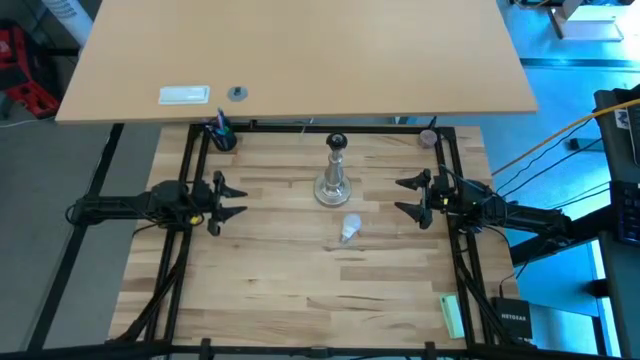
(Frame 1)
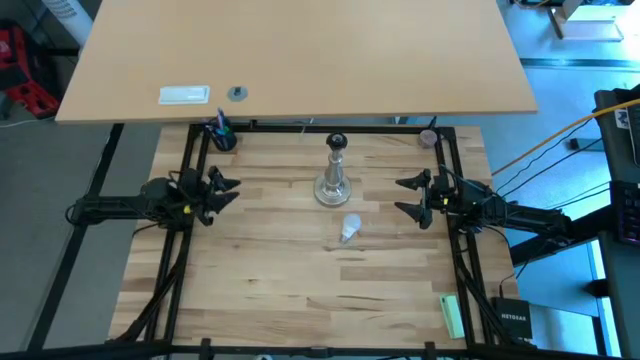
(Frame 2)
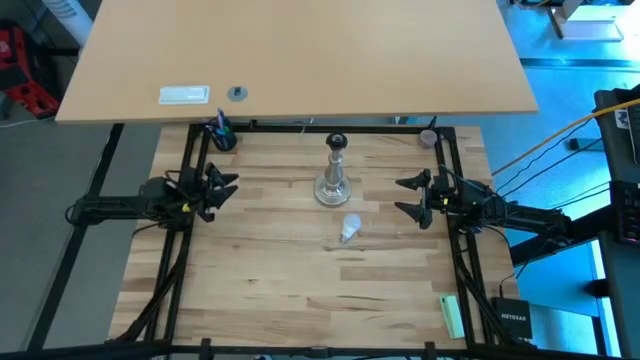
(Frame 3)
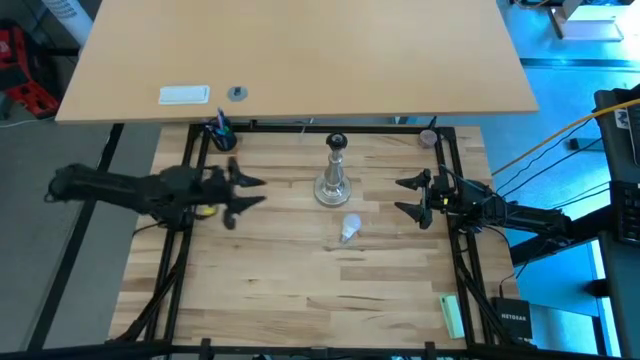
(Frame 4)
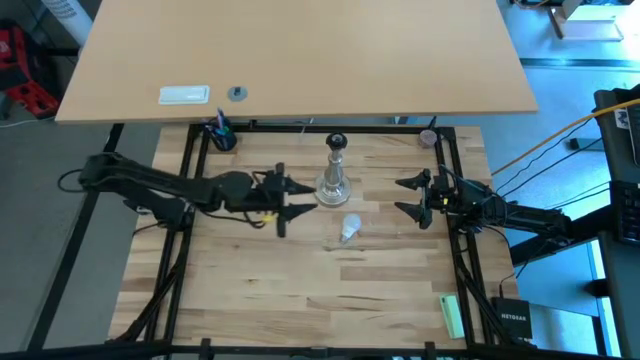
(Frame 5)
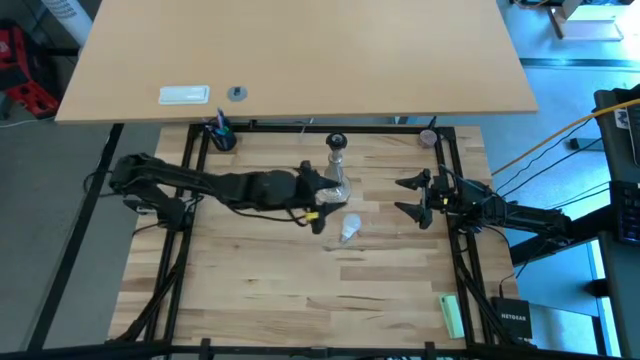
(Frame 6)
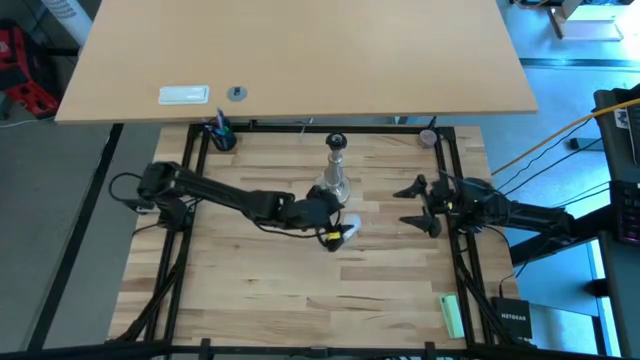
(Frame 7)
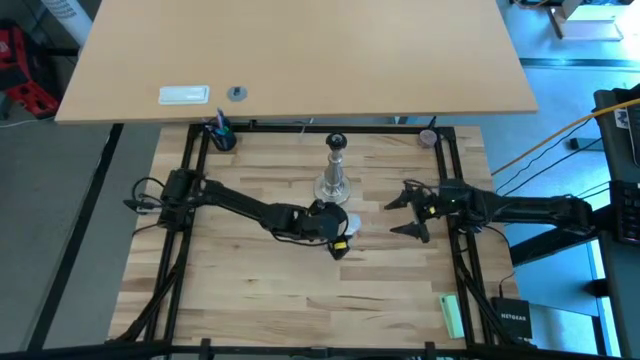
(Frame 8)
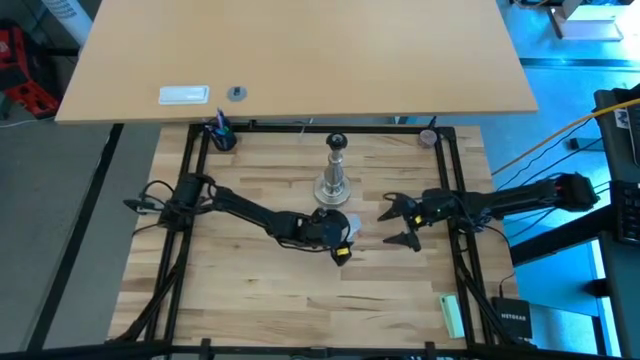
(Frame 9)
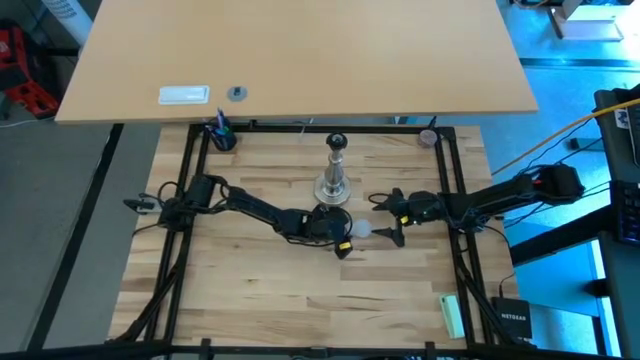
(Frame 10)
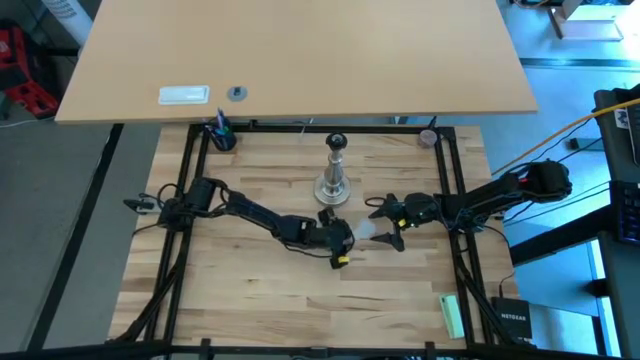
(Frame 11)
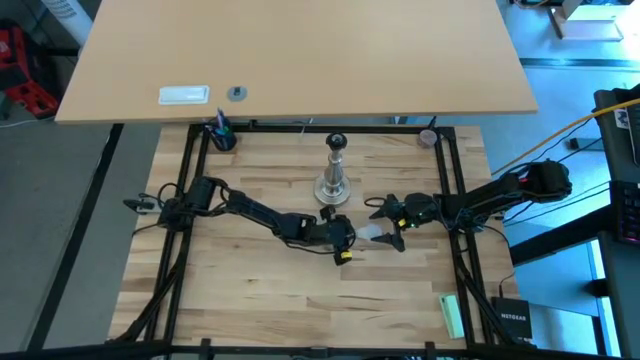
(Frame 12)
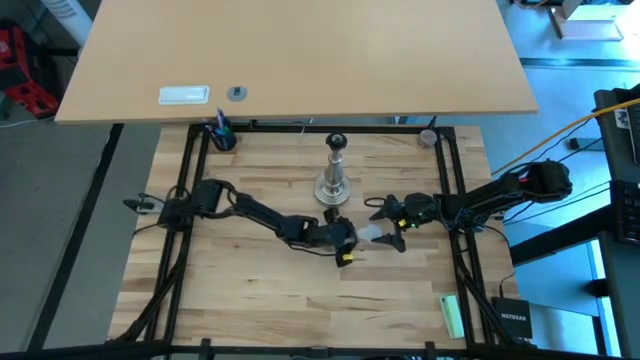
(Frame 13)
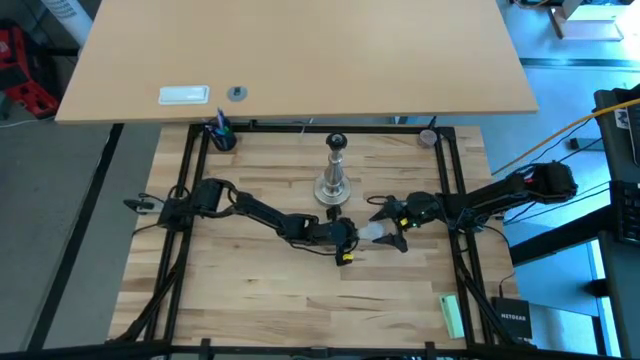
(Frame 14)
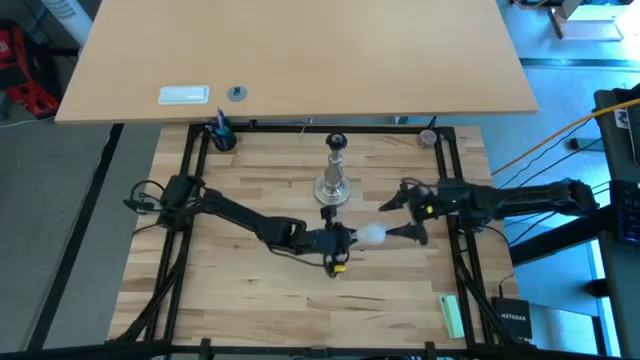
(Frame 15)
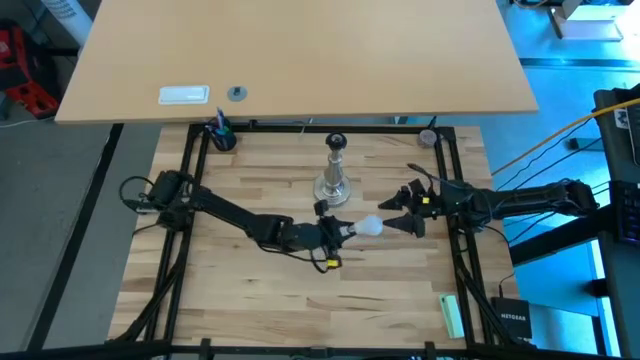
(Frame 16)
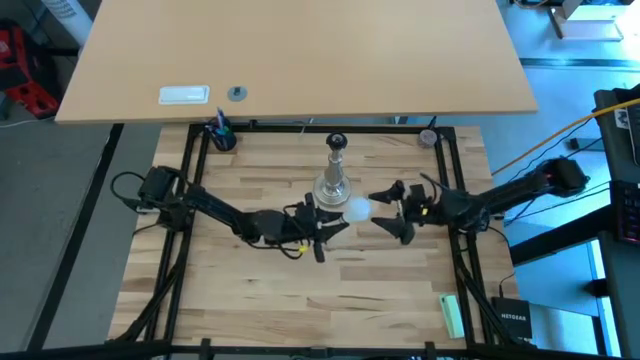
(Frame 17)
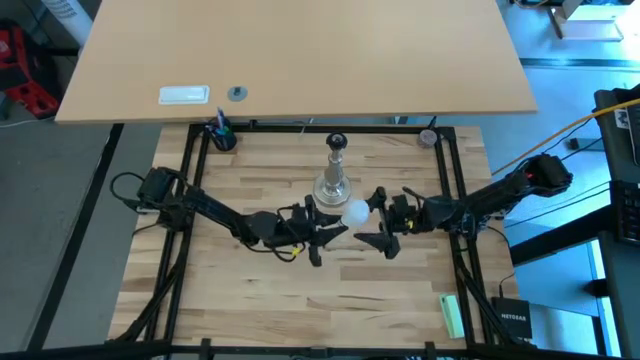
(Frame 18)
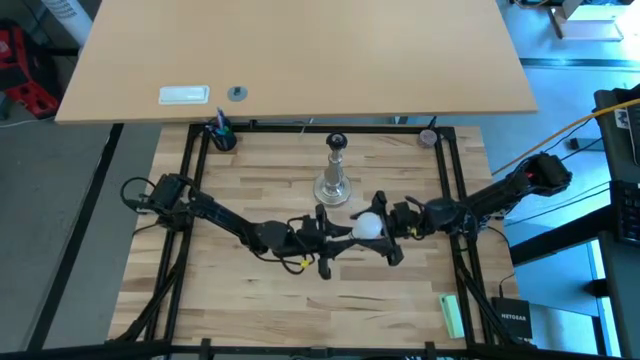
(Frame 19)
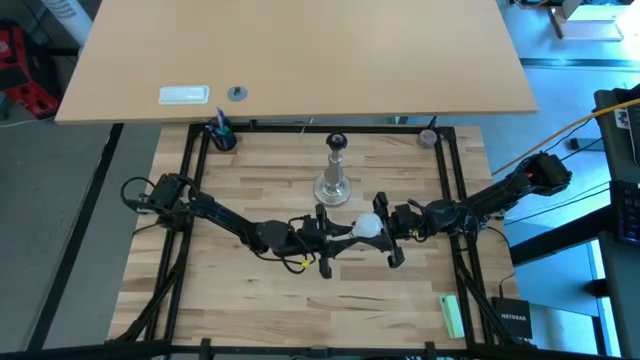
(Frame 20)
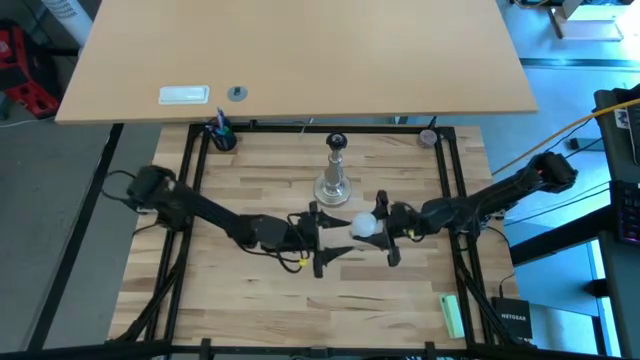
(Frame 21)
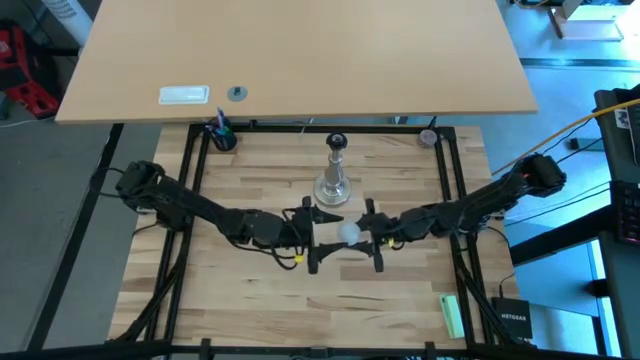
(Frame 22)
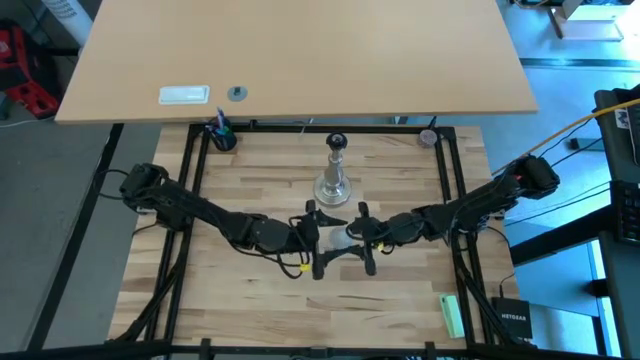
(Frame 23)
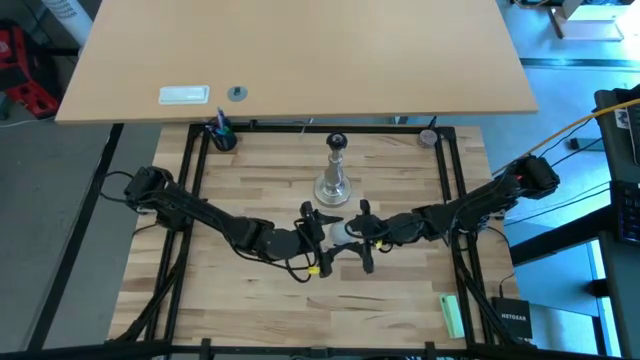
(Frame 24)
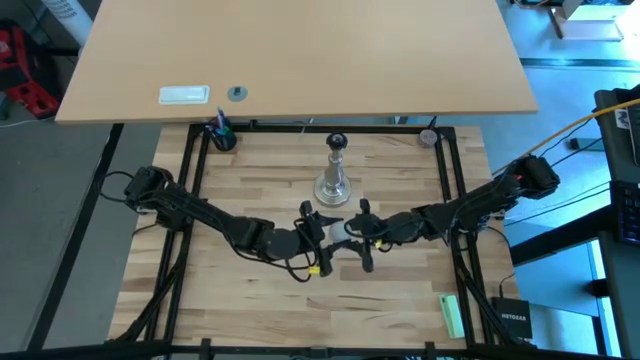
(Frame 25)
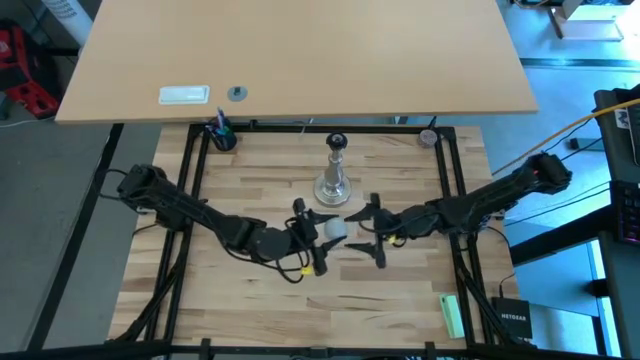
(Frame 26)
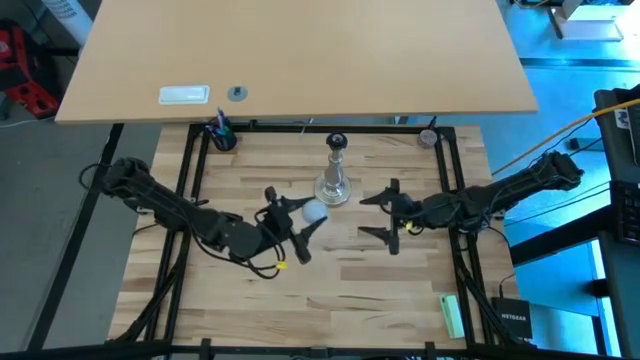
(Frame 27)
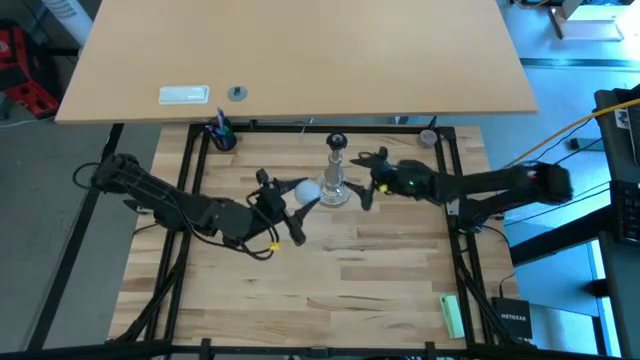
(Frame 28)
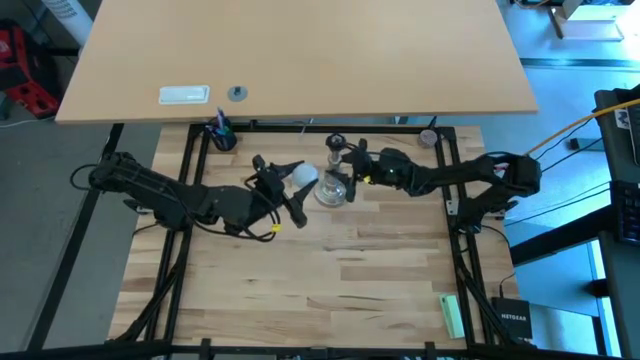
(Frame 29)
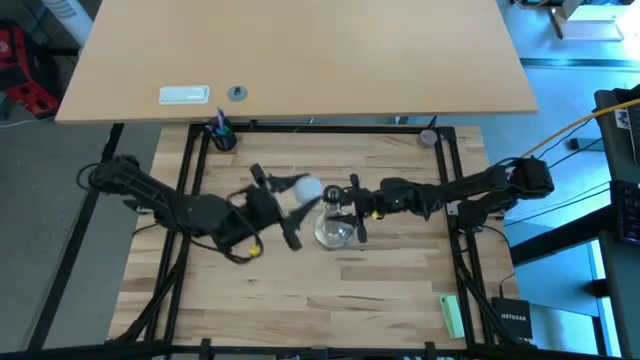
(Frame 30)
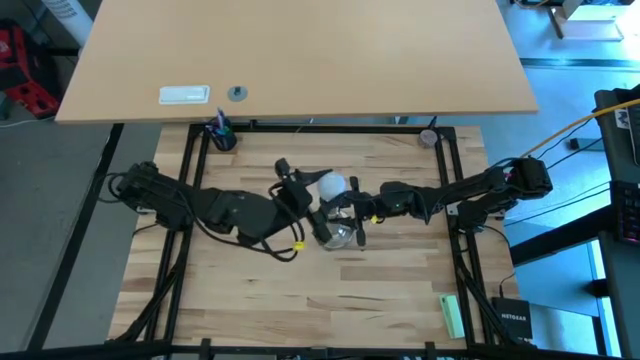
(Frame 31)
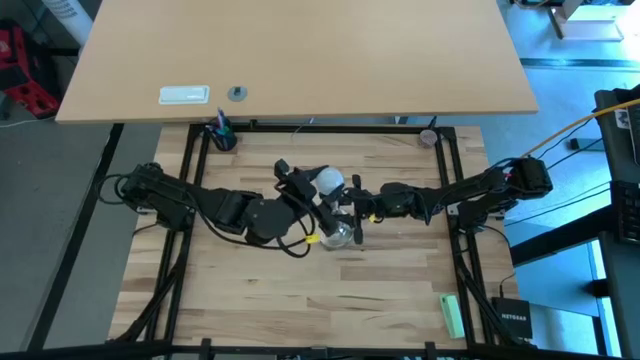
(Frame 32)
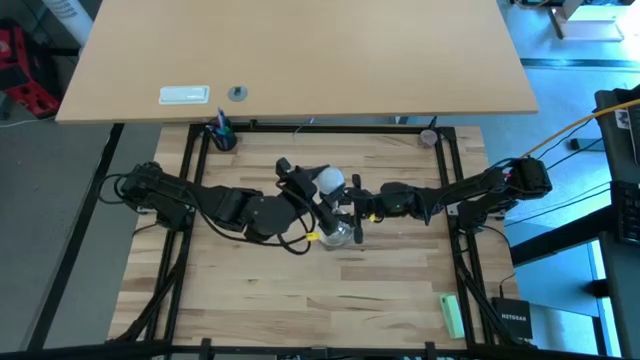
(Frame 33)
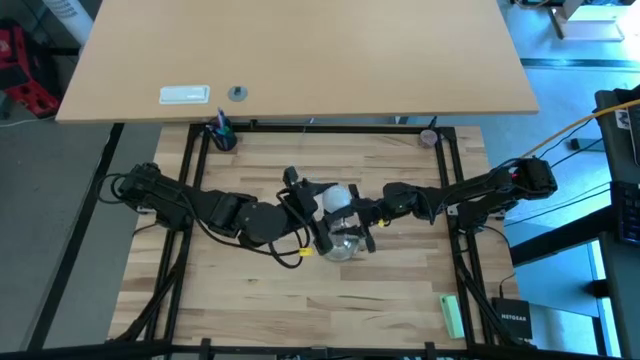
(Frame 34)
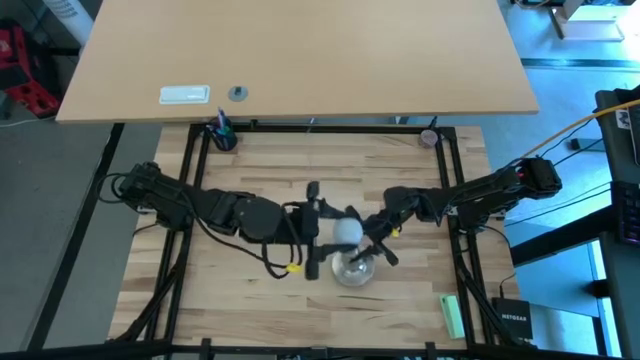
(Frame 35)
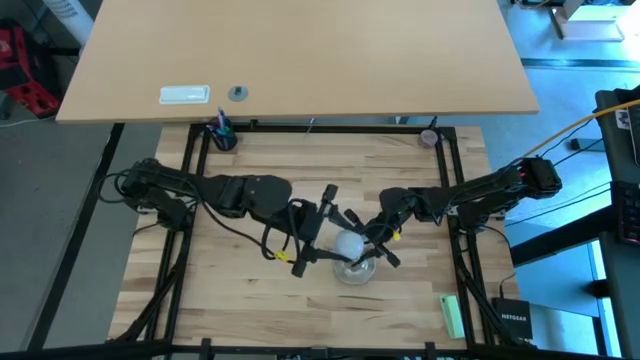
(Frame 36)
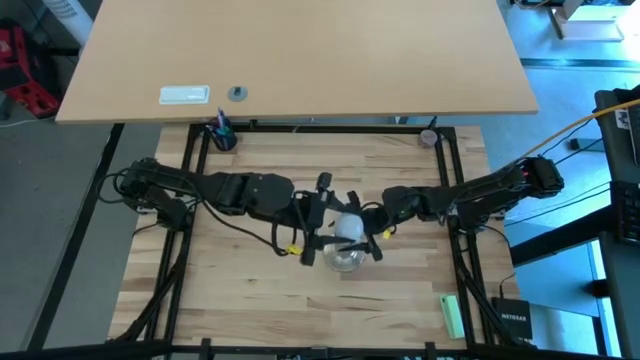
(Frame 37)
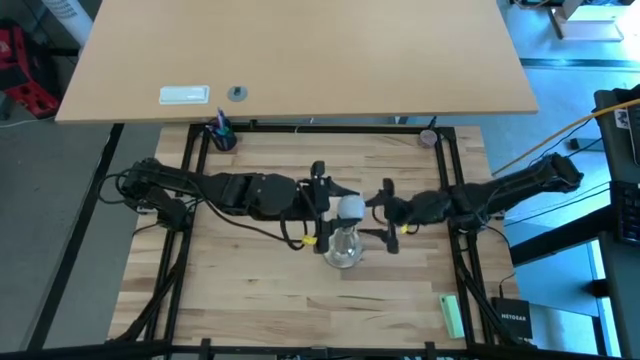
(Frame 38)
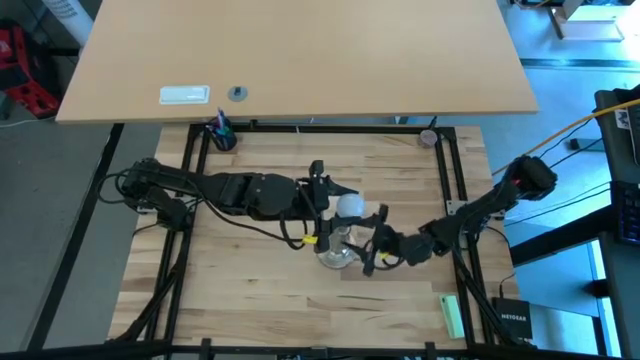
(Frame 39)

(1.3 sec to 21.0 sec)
Task: Screw lightbulb
Insert the lightbulb into the lamp

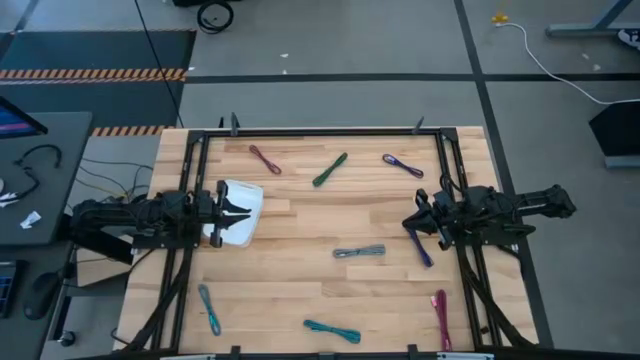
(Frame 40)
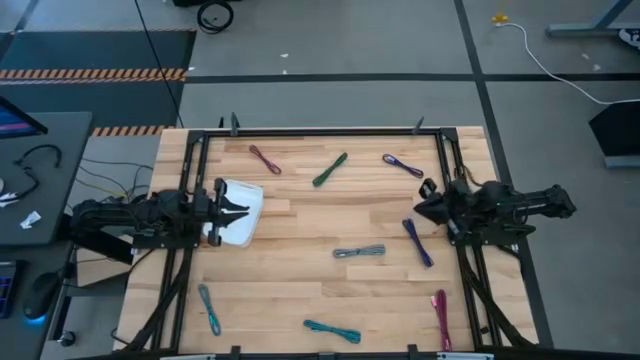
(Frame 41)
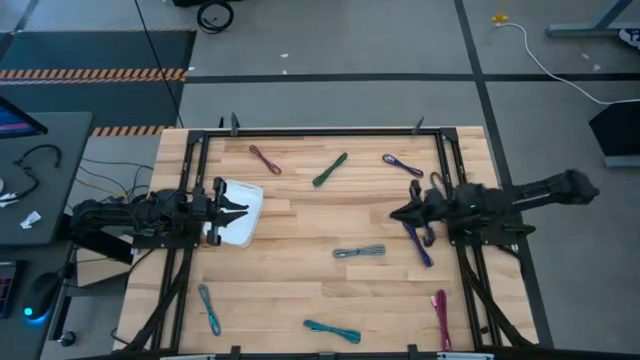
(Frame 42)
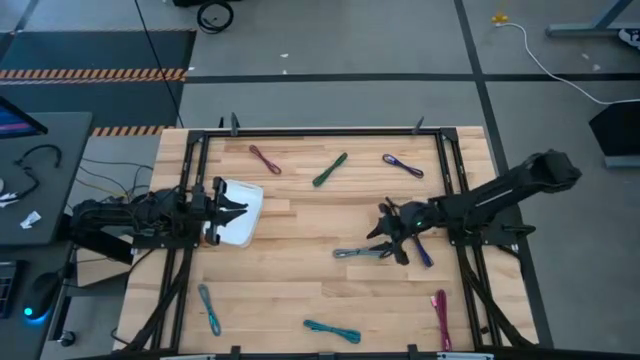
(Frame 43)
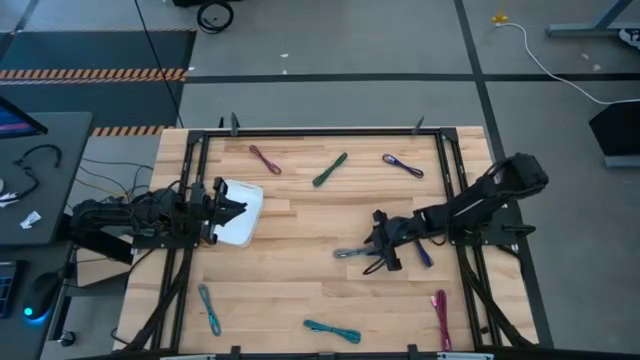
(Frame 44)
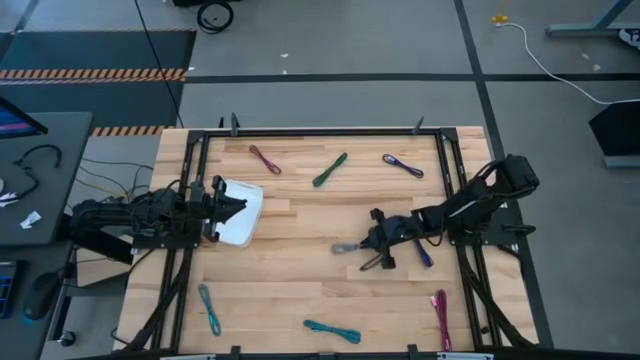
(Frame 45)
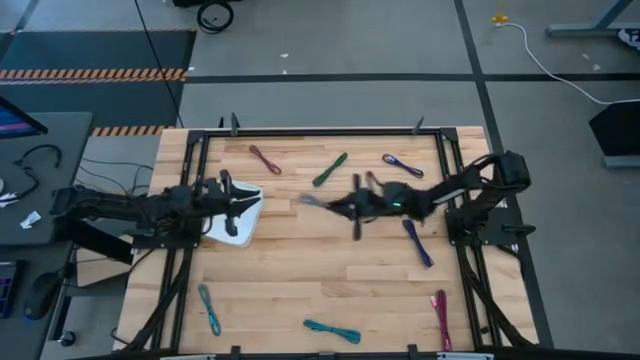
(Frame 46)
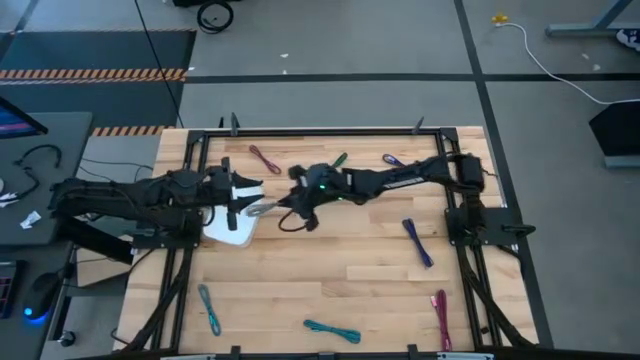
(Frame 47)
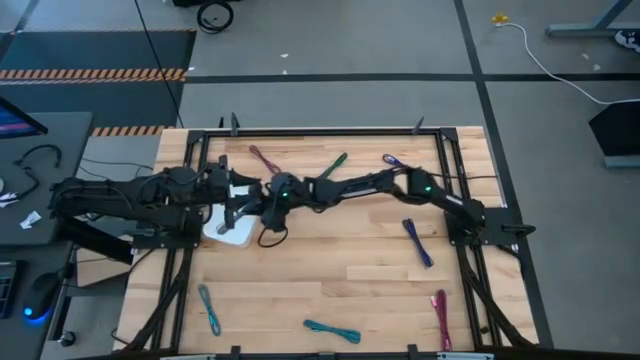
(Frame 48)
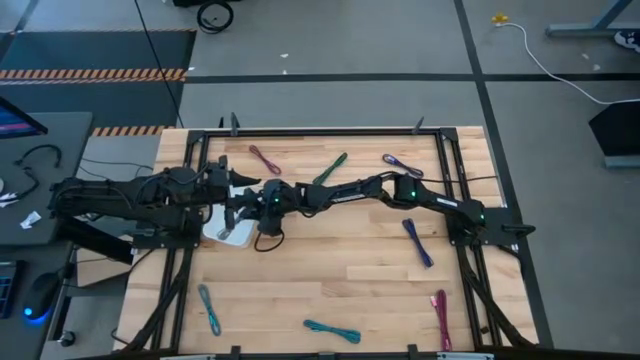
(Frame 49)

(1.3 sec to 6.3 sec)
Task: Pick and place USB-C Cables
Put the white and patterned charger cable into the white bin
